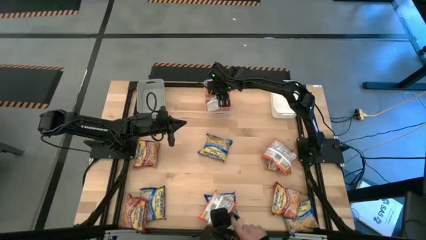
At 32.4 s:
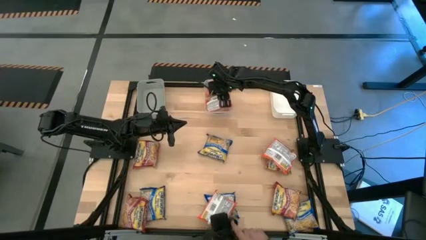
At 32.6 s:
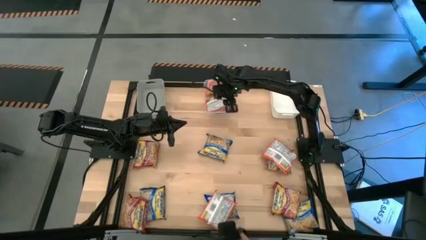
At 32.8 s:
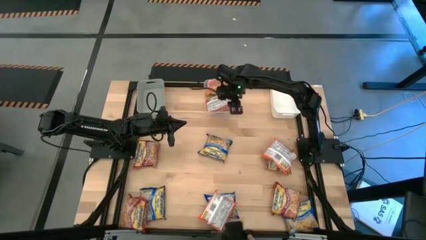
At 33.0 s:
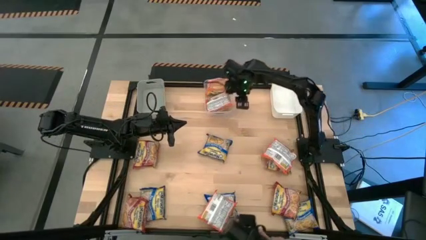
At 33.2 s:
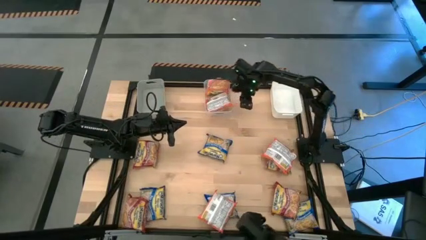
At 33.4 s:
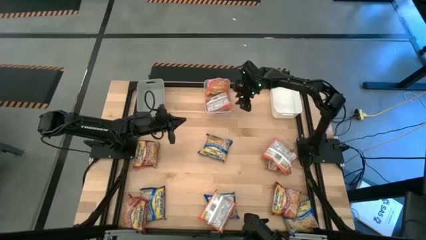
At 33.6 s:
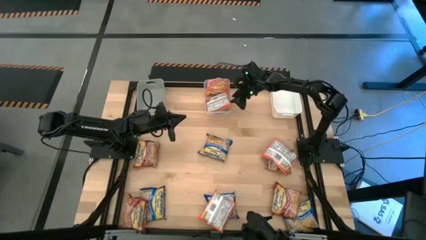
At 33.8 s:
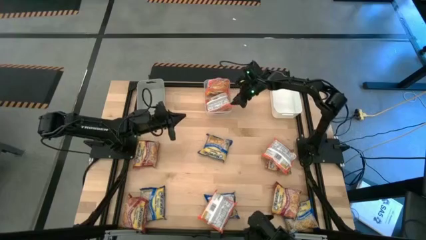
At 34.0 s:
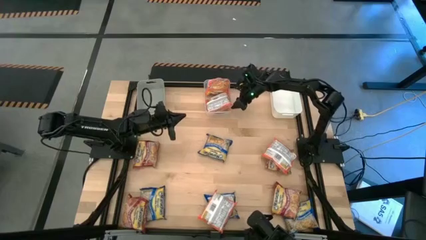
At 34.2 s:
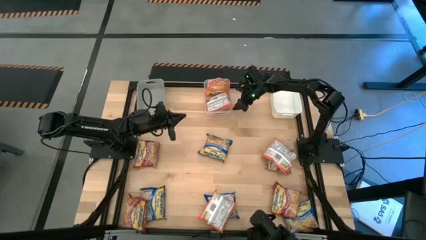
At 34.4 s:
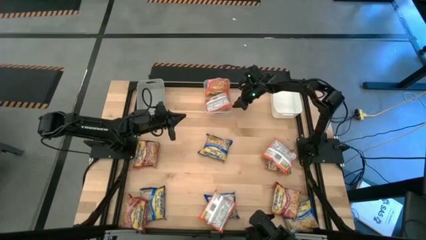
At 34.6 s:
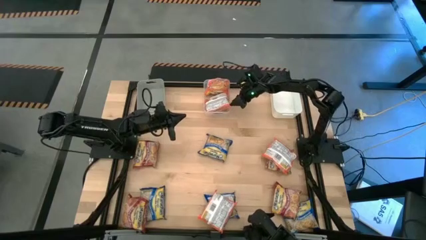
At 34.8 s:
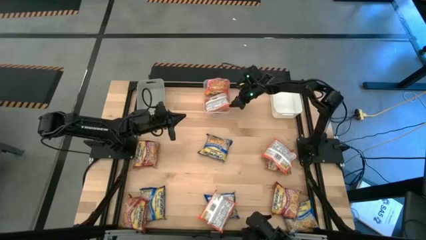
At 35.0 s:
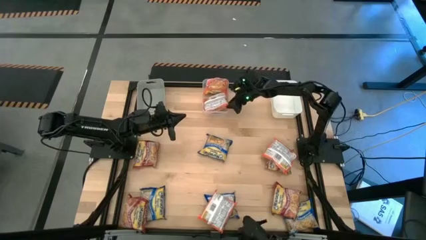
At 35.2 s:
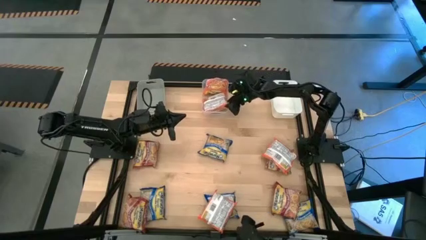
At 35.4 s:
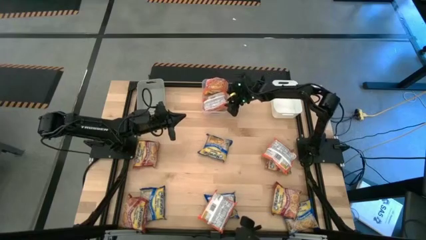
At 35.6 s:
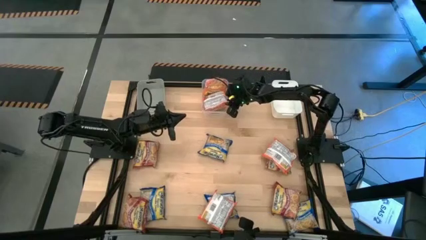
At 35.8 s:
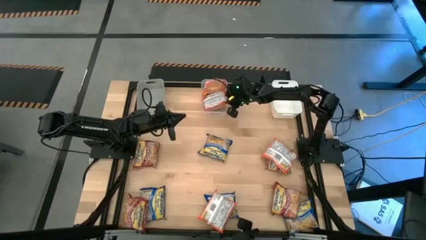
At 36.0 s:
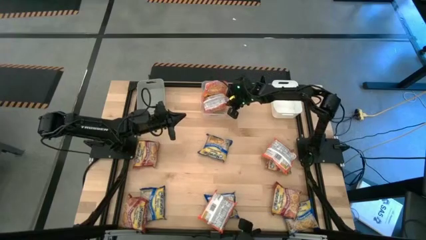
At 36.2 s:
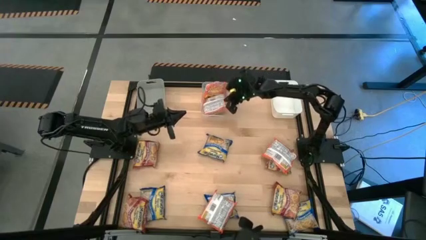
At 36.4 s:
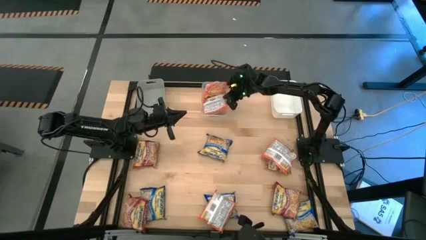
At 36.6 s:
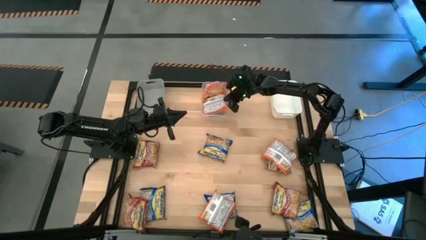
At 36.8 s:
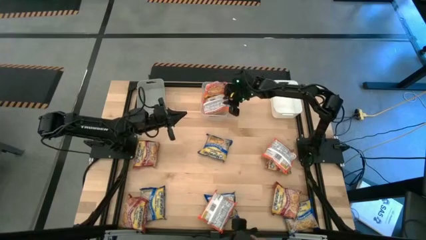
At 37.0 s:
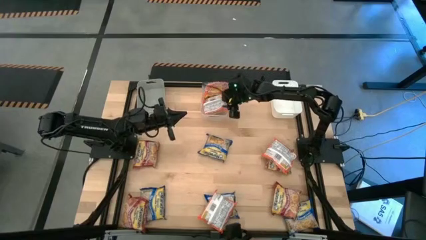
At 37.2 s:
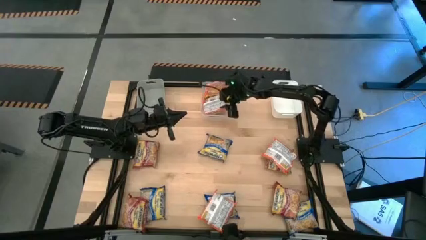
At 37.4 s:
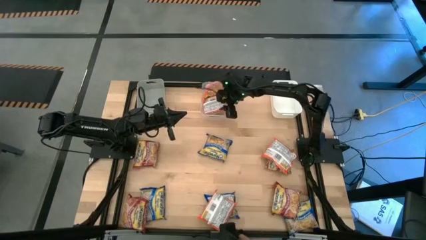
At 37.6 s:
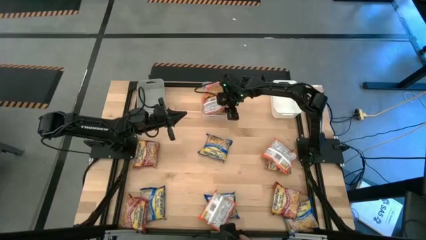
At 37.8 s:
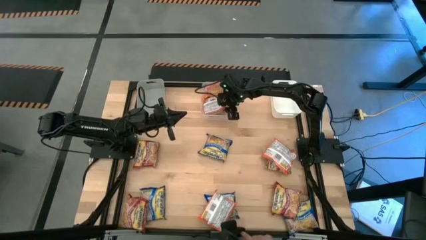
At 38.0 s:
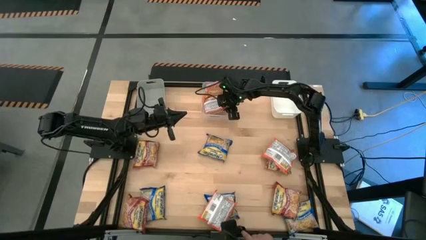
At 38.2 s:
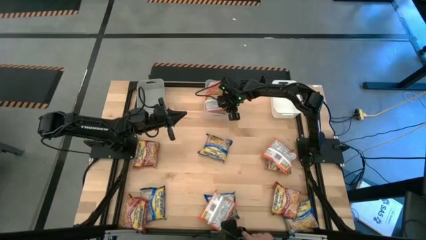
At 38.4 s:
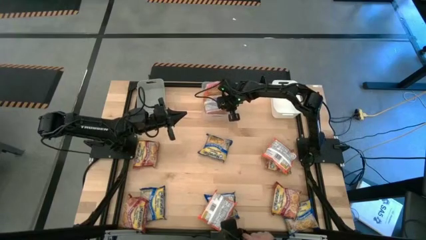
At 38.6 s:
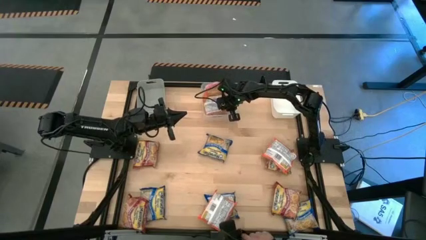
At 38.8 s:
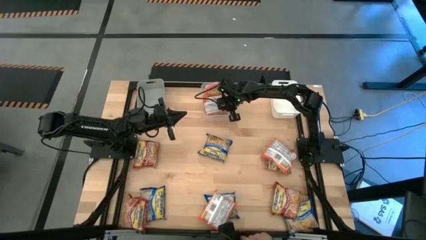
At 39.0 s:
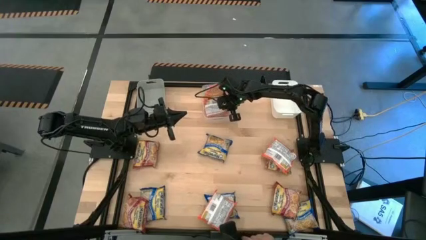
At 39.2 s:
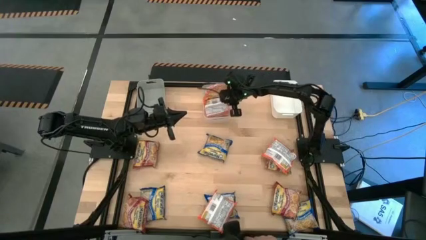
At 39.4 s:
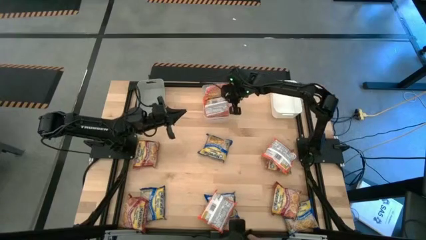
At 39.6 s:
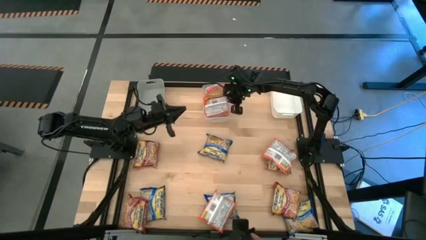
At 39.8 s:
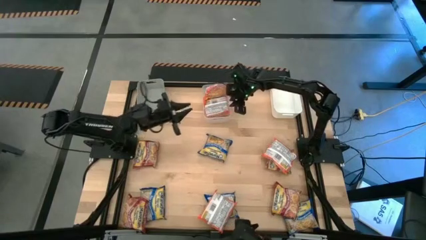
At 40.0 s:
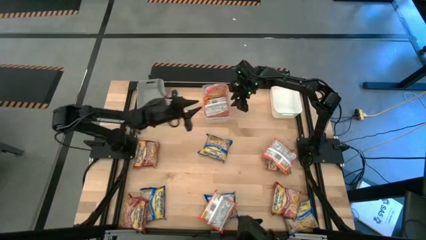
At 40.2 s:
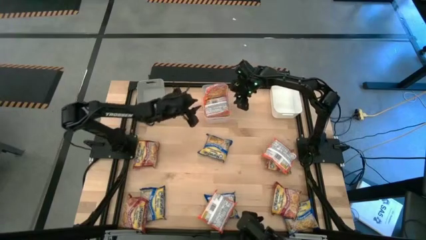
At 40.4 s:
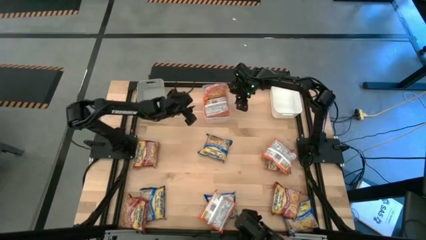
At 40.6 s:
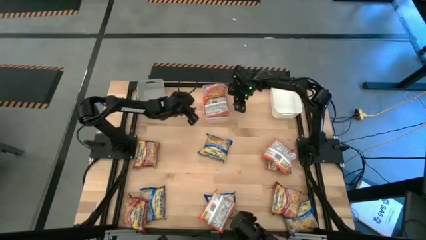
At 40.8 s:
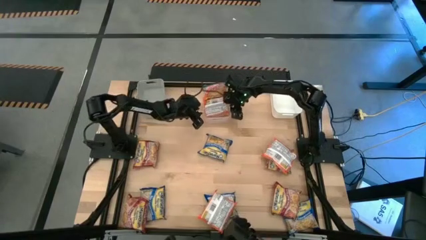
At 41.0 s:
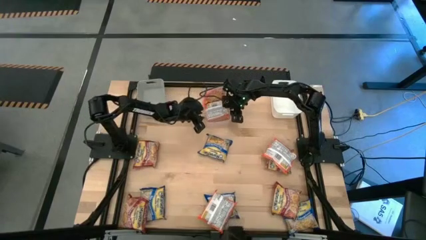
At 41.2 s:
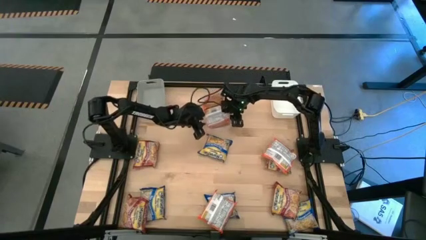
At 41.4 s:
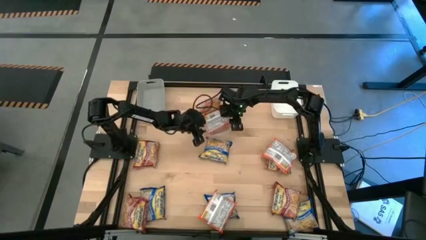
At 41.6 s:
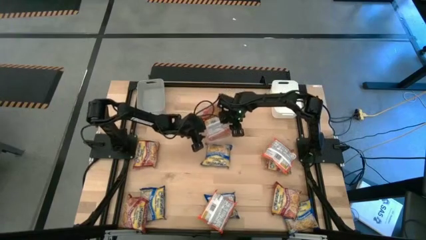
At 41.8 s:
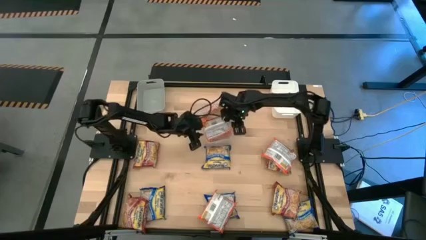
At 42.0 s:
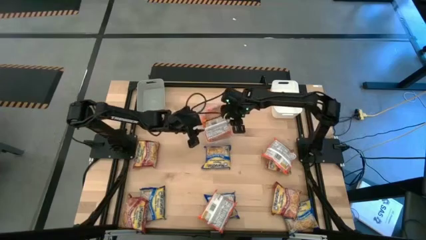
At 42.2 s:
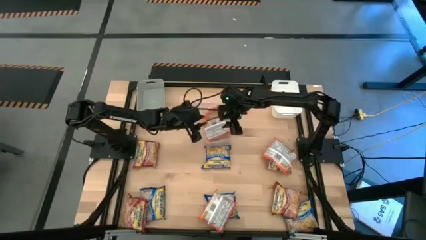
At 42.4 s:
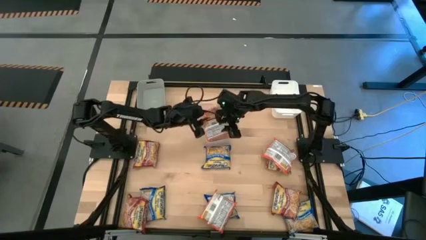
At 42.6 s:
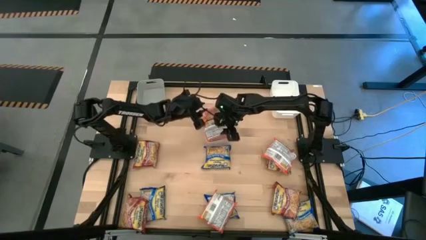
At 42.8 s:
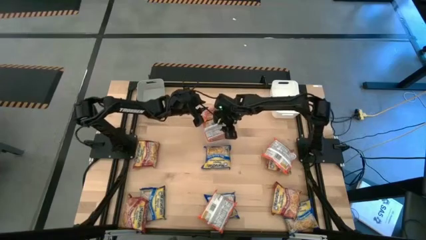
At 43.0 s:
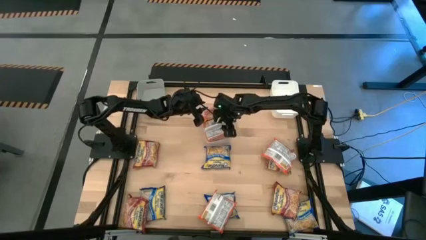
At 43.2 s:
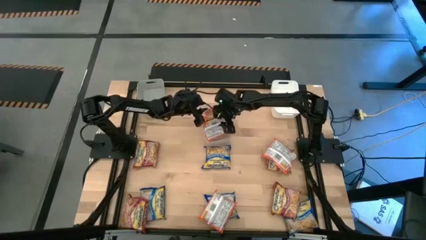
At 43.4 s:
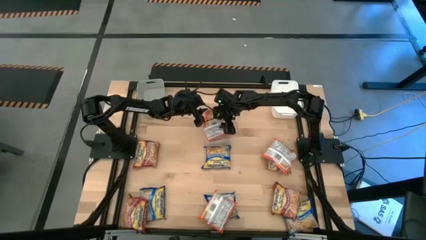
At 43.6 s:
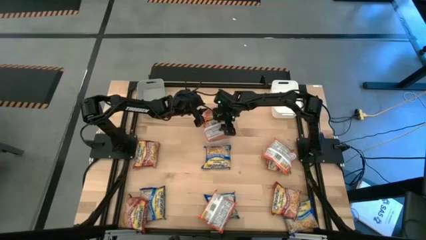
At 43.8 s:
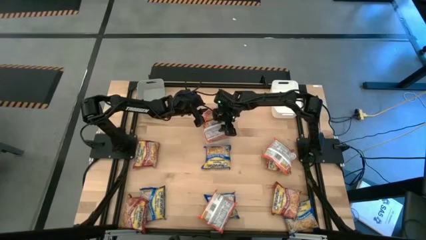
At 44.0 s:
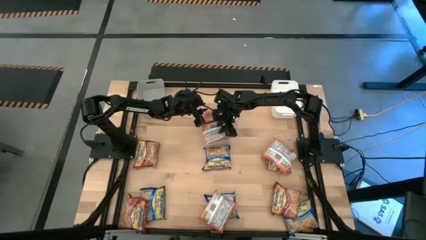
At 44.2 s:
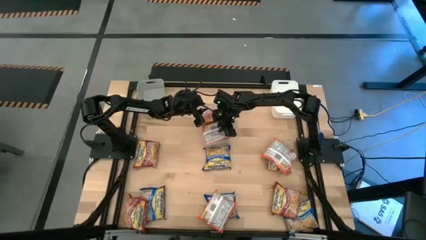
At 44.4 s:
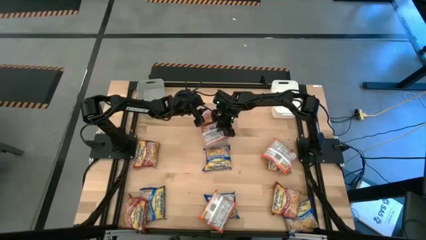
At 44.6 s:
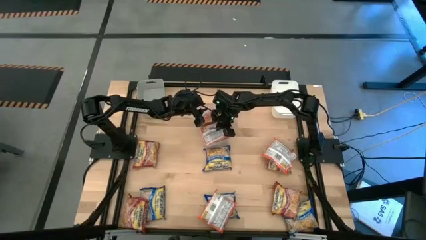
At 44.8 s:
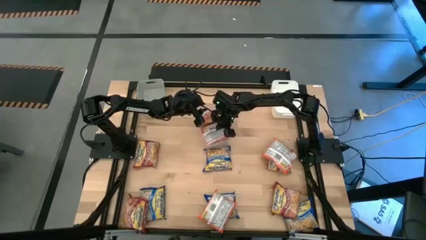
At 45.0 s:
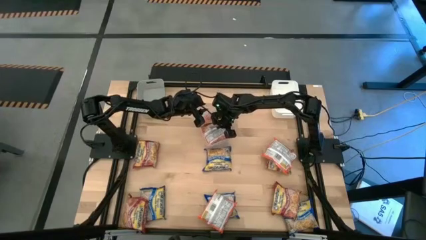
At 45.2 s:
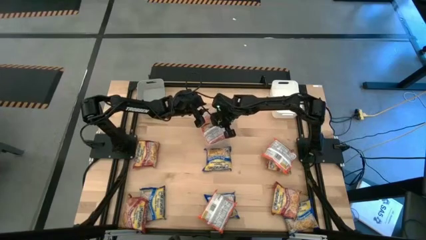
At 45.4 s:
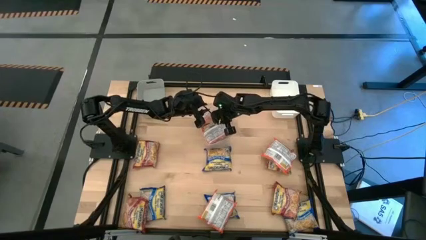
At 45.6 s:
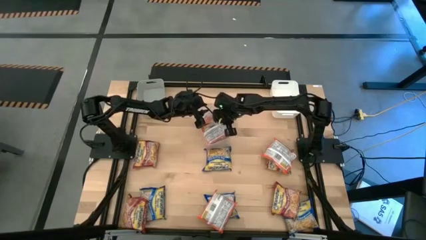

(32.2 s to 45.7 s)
Task: Sort Maruchan noodles
Adjust the orange noodle on the transparent bin
